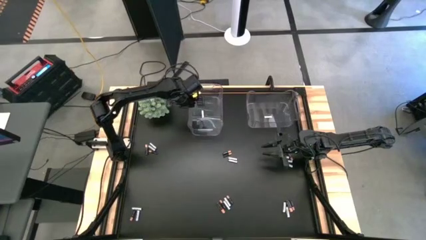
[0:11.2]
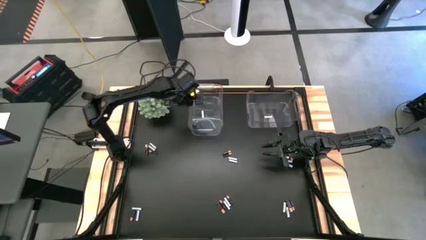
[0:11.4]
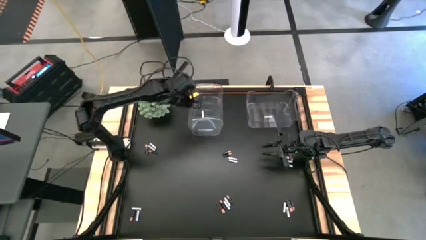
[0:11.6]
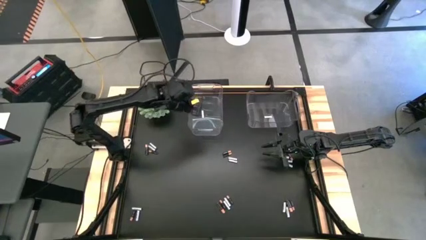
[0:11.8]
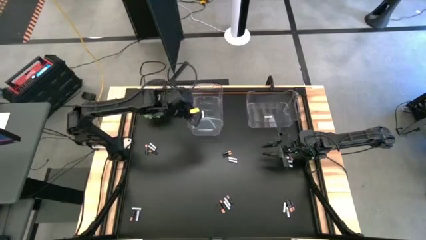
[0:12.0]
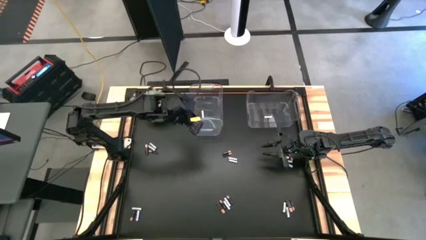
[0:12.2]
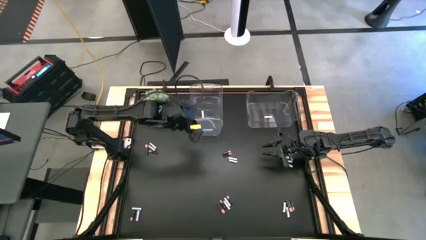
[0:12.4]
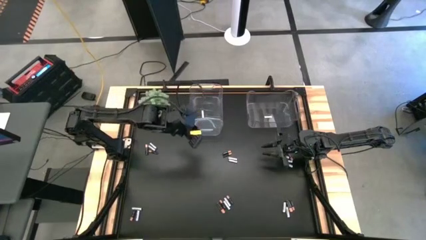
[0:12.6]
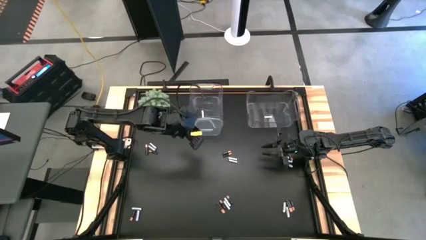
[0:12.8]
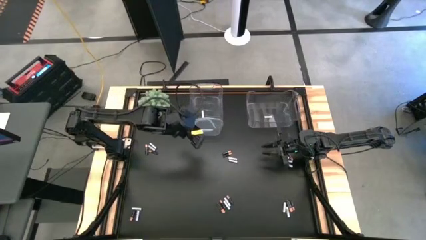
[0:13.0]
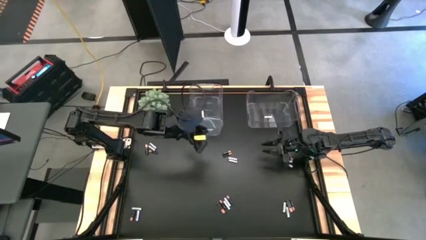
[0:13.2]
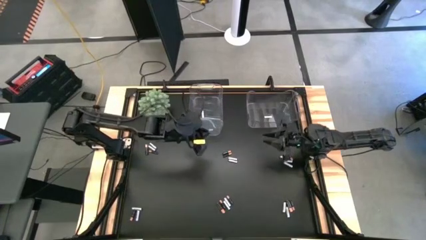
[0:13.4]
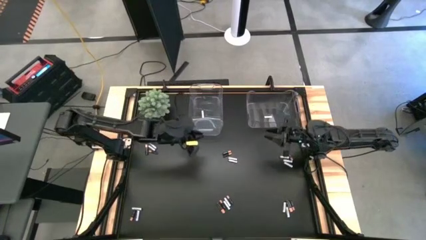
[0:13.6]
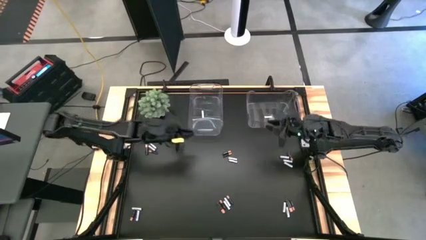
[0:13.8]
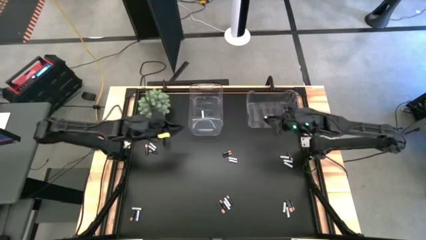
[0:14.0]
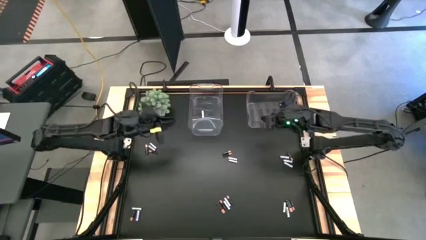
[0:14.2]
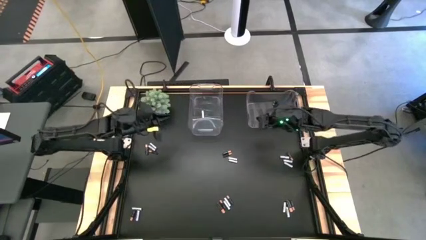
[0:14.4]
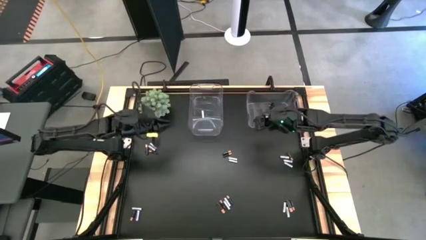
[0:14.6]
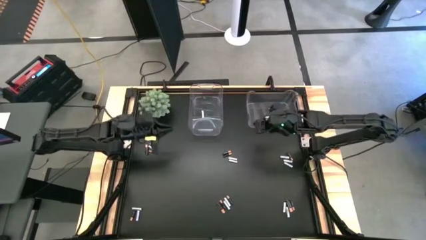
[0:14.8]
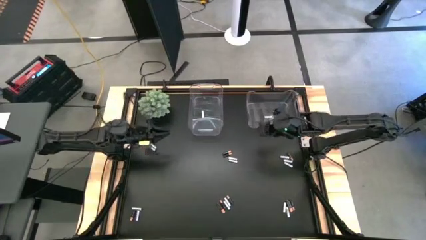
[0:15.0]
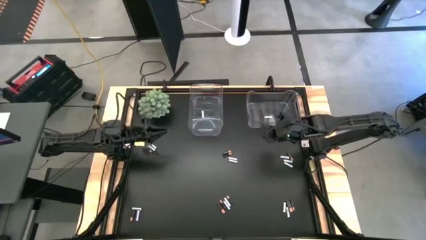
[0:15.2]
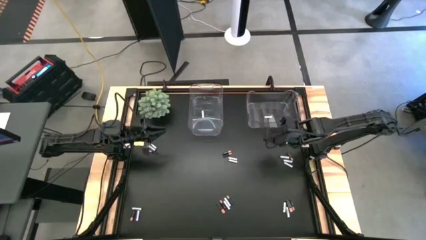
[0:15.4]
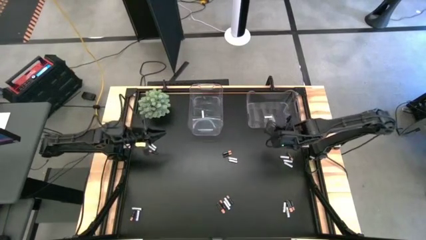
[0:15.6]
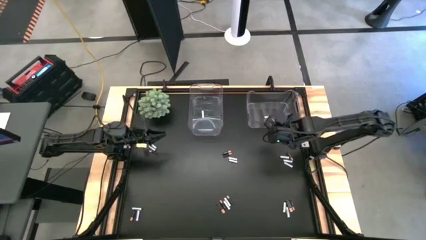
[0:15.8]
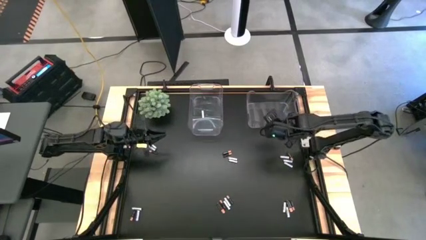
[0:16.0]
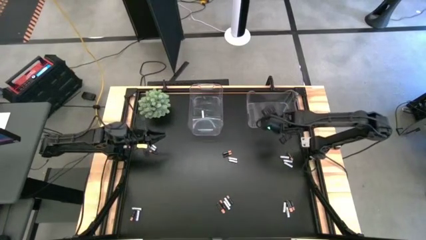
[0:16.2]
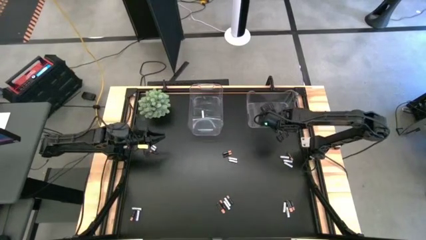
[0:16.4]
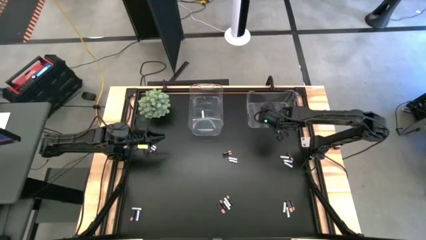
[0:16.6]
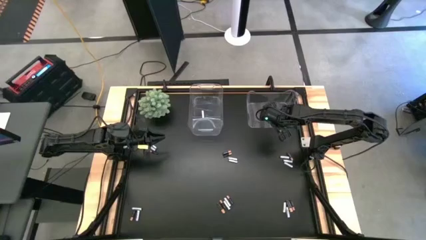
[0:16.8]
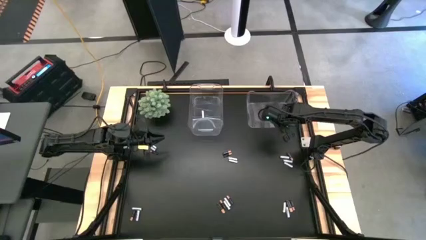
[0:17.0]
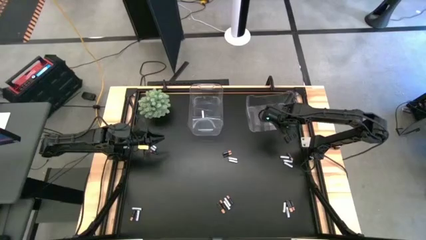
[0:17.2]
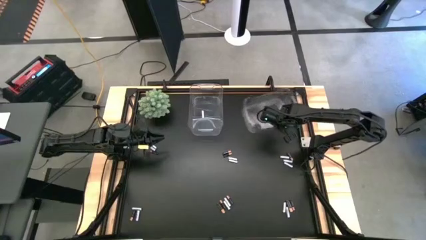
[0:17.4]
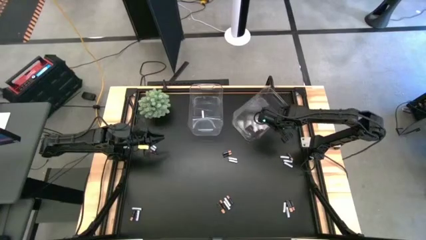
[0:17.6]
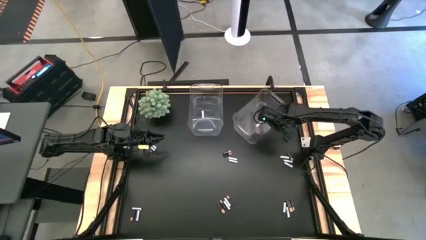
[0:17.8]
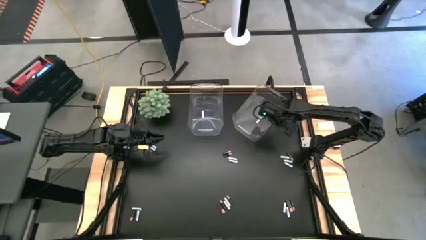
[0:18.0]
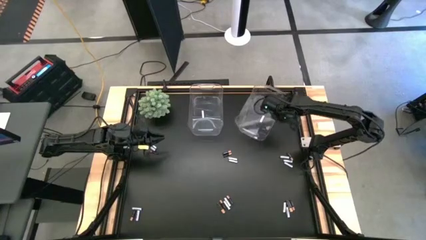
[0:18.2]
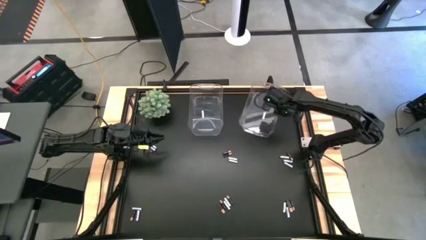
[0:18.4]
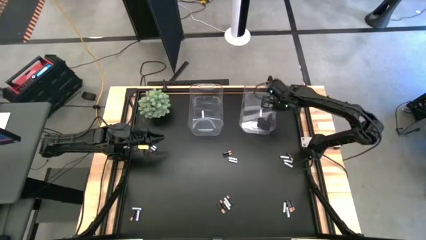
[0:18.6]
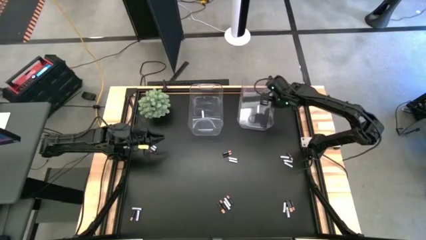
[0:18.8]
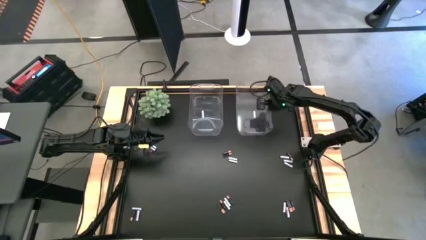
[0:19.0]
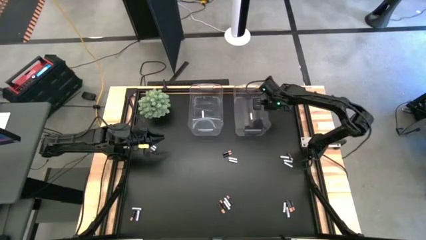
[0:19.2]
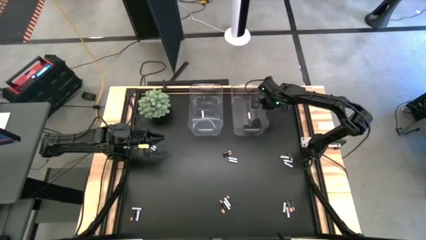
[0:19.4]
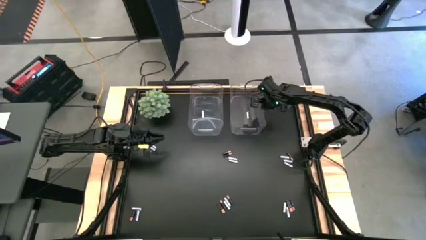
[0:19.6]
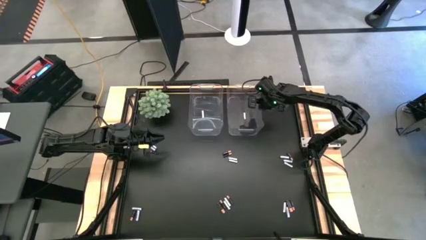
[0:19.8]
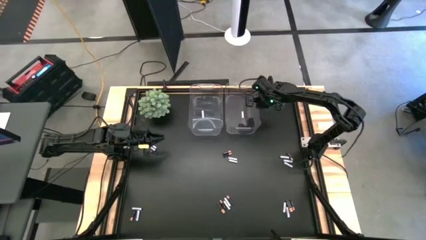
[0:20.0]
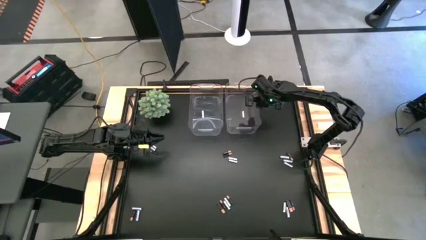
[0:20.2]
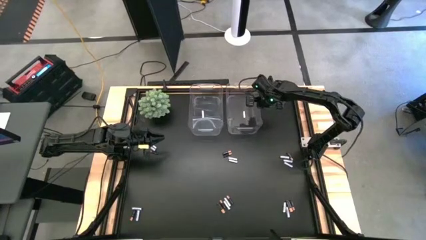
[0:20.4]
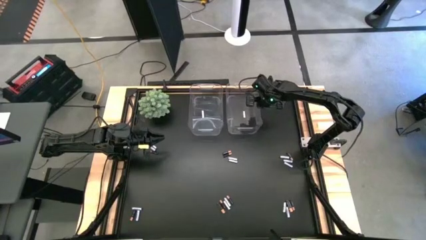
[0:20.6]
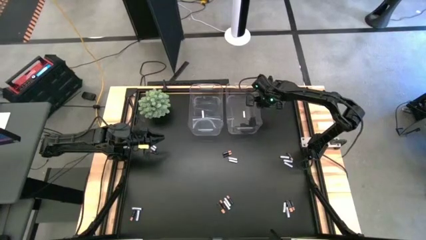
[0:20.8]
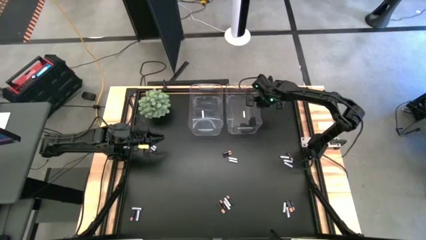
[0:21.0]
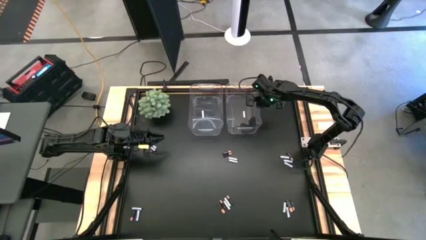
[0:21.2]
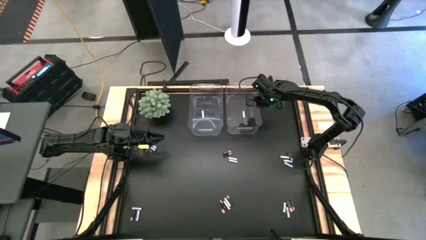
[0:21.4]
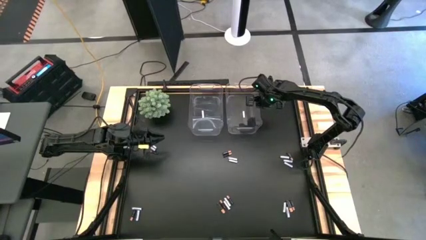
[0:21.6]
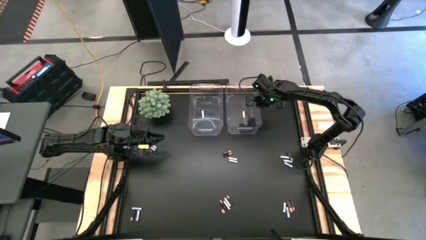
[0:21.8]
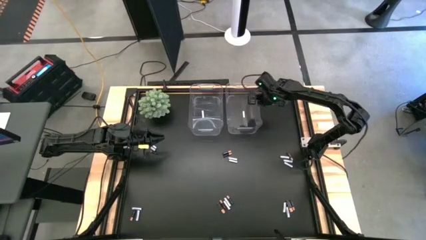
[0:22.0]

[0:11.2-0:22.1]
Task: Sort batteries
Adjust the right transparent bin

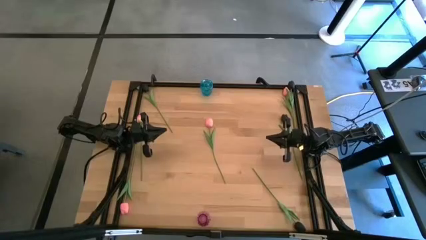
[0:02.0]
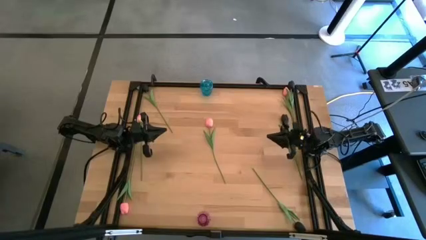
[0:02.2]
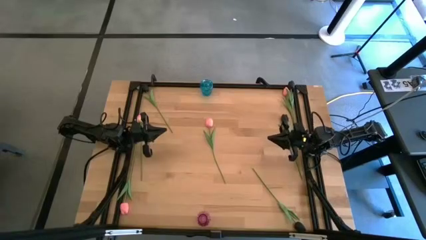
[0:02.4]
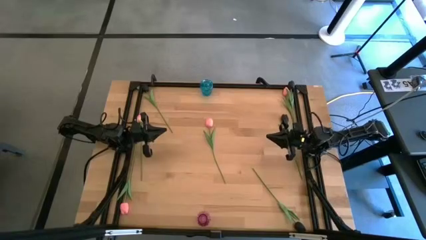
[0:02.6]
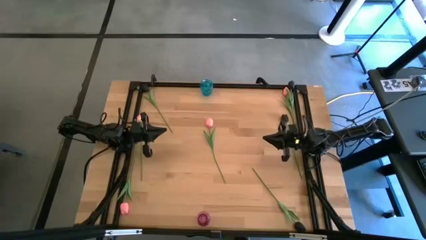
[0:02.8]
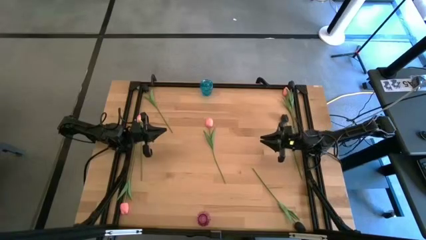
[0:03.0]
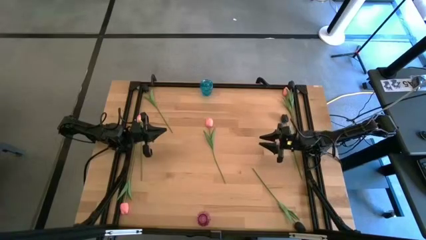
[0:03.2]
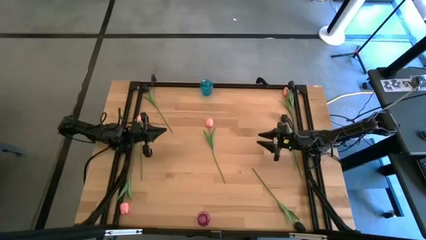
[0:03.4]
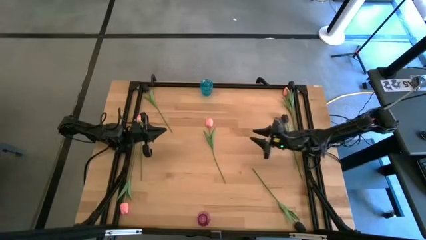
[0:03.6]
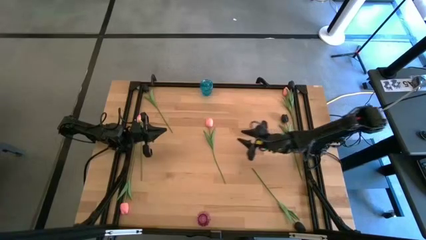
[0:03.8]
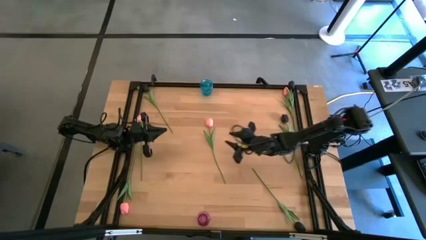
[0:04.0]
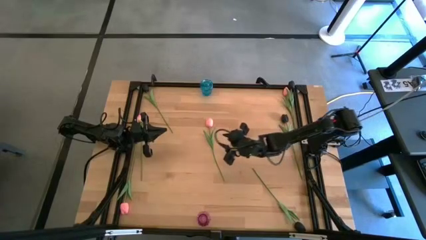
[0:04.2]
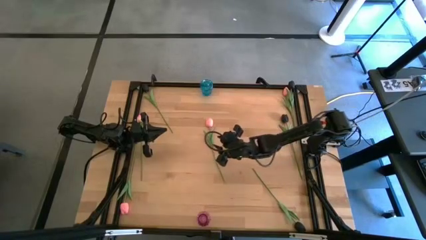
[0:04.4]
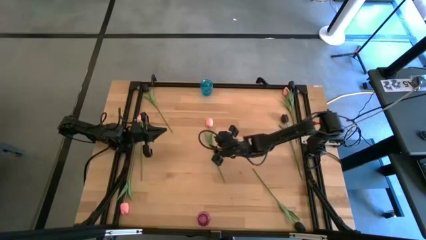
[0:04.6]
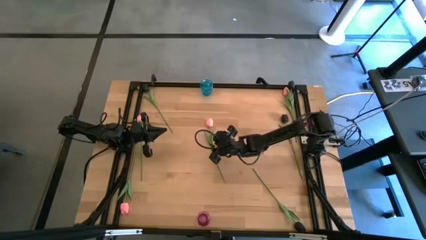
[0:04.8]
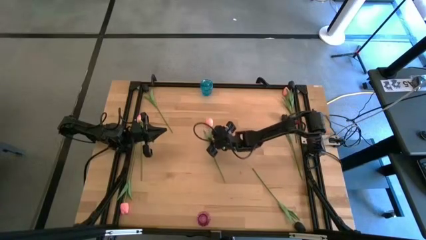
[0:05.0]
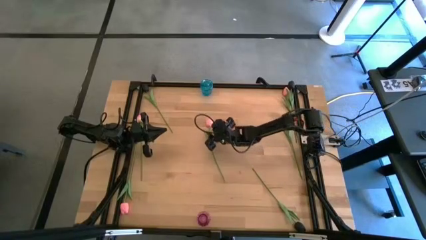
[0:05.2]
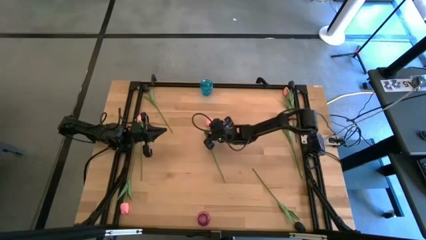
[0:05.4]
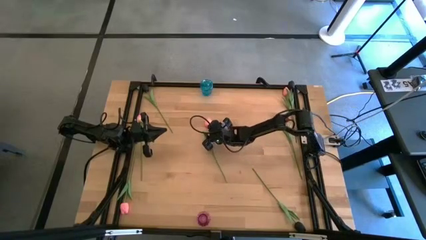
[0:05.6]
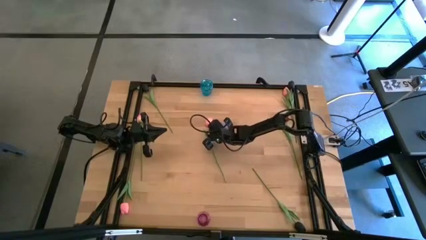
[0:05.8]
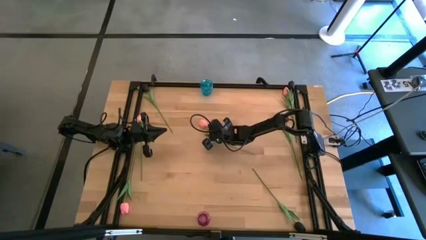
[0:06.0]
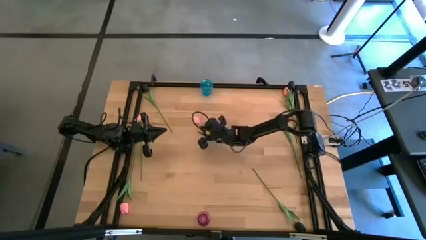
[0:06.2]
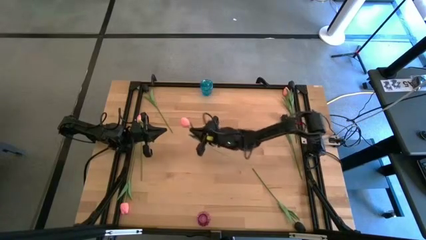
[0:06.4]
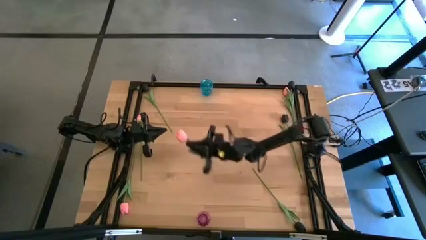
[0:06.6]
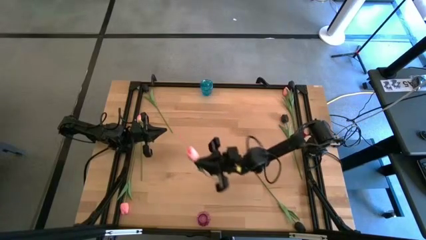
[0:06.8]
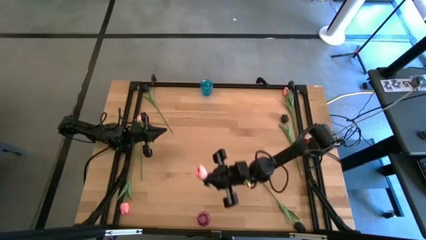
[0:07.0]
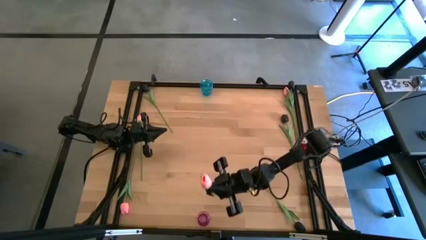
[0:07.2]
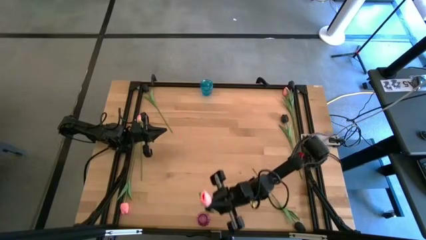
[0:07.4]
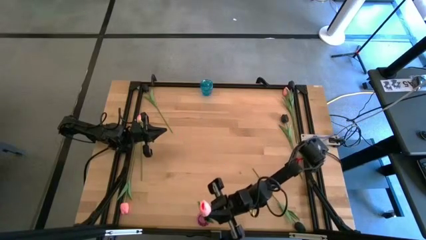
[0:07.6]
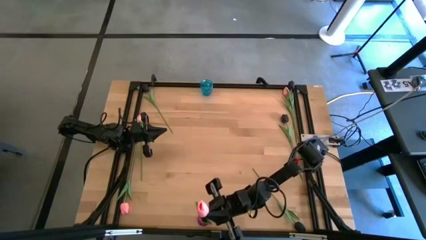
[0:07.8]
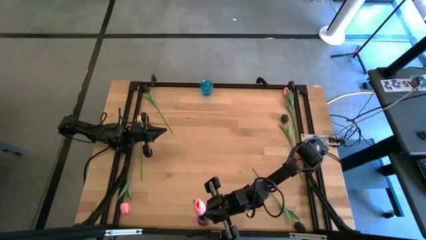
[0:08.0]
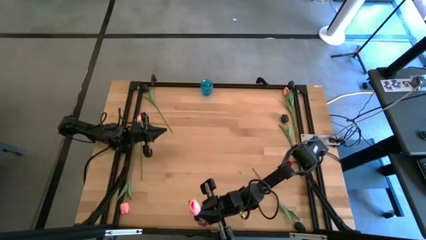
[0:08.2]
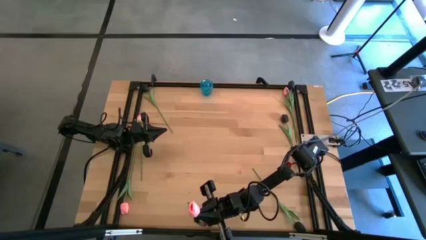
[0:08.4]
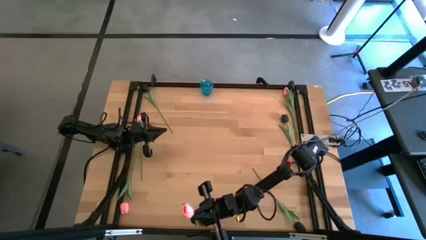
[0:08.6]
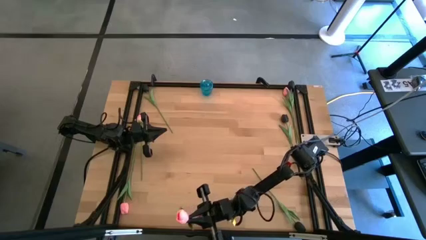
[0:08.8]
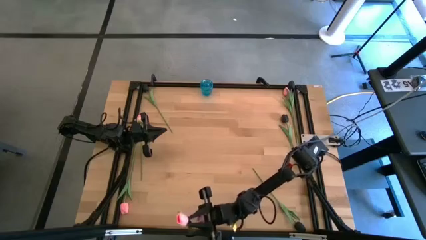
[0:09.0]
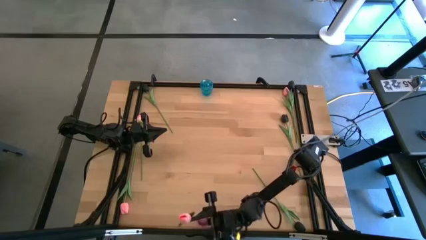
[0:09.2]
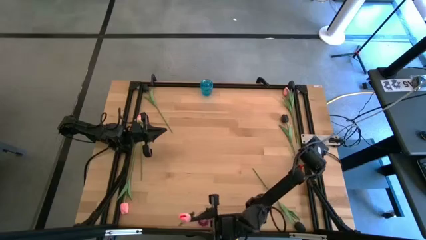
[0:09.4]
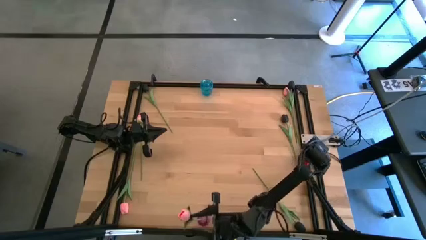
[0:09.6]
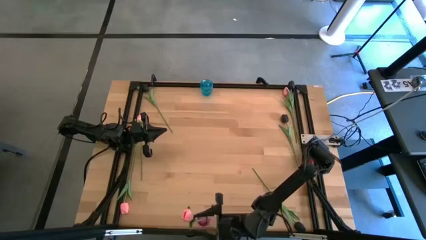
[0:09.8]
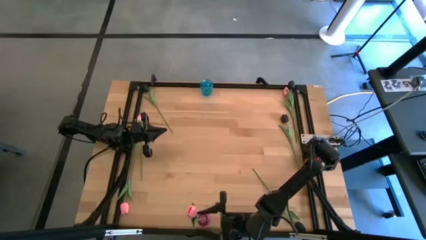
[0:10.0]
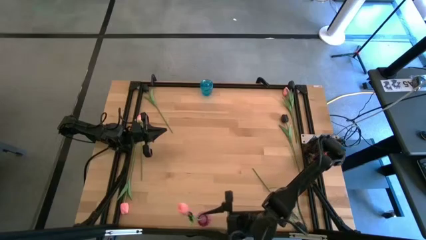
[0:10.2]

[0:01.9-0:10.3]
Task: Sort flowers into vase by color
Put the center pink flower into the violet vase
